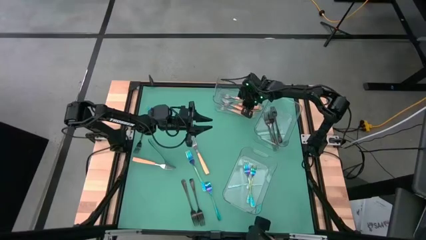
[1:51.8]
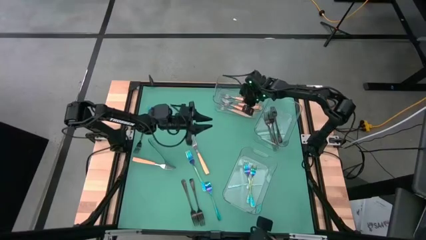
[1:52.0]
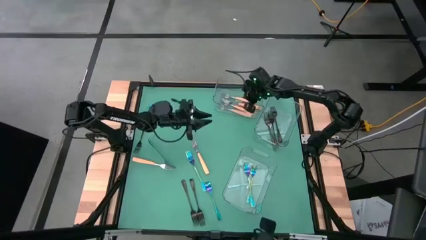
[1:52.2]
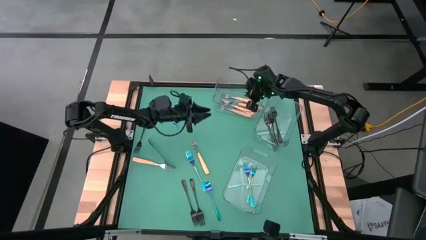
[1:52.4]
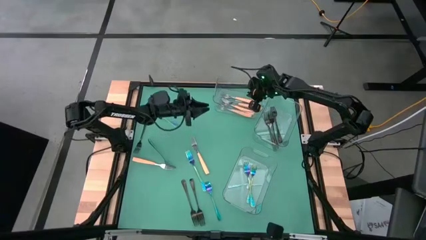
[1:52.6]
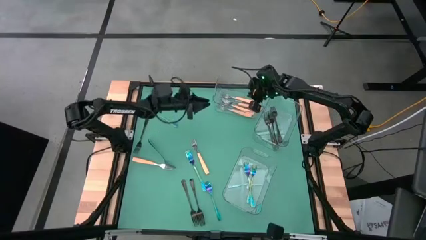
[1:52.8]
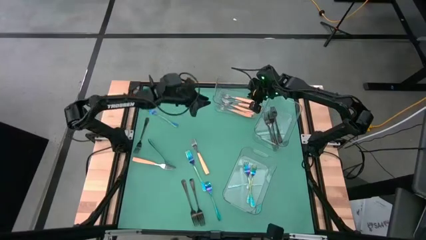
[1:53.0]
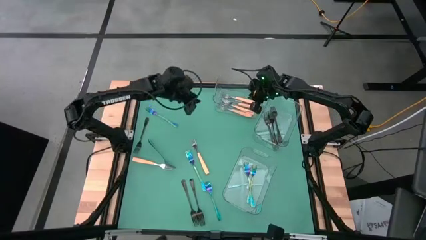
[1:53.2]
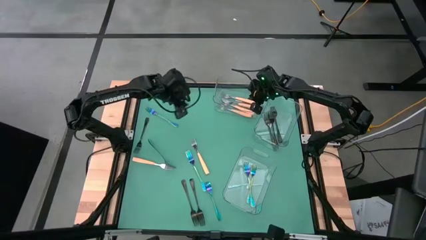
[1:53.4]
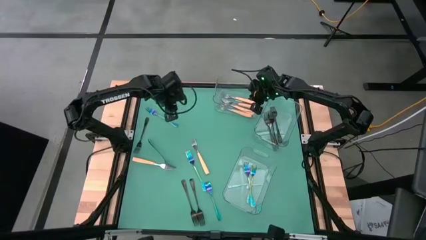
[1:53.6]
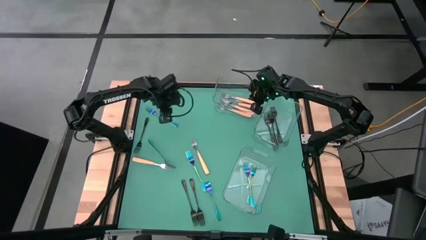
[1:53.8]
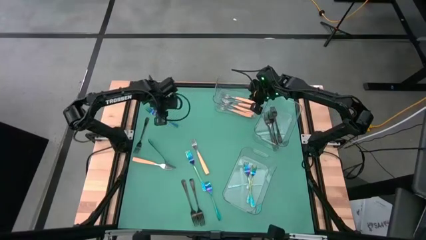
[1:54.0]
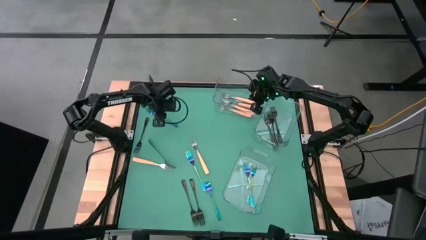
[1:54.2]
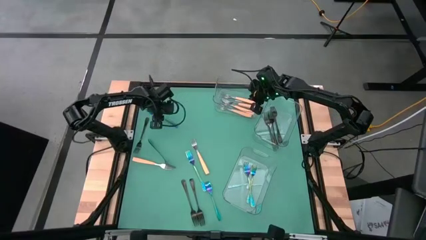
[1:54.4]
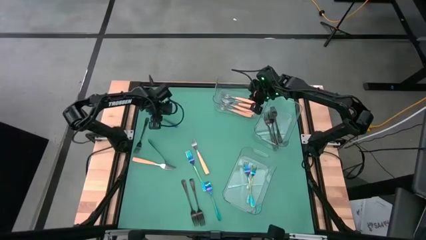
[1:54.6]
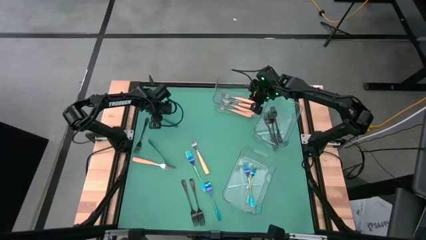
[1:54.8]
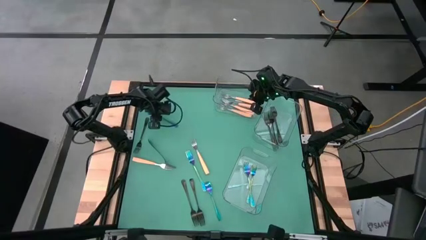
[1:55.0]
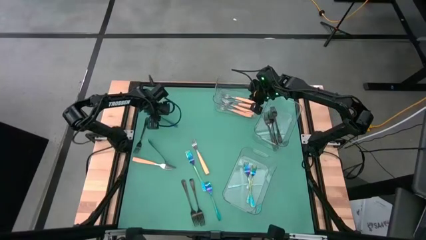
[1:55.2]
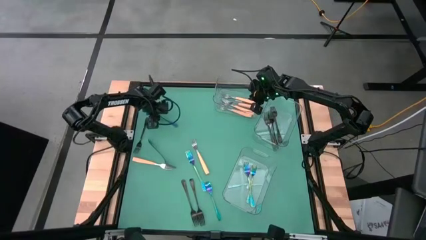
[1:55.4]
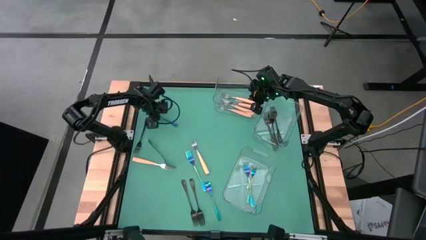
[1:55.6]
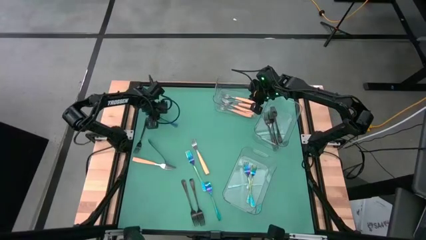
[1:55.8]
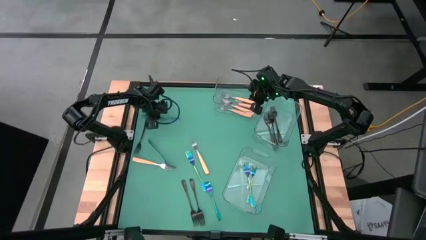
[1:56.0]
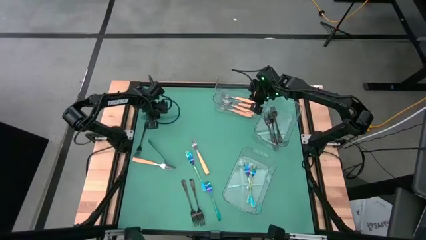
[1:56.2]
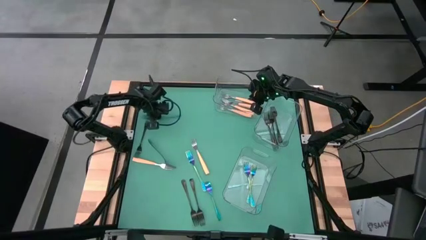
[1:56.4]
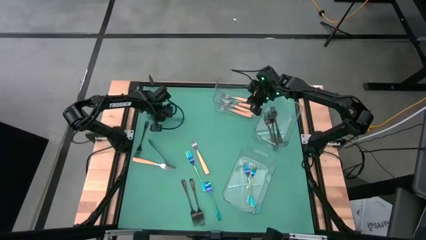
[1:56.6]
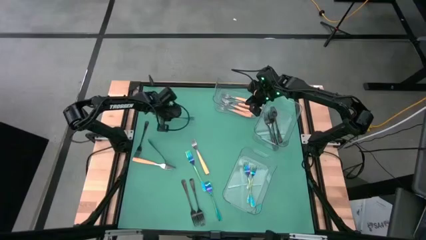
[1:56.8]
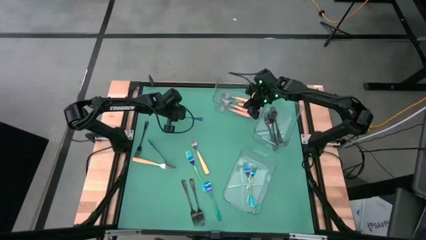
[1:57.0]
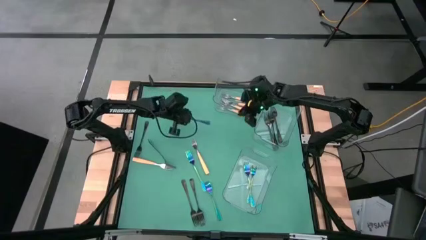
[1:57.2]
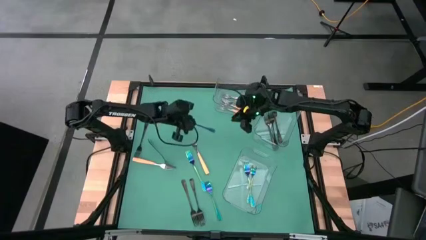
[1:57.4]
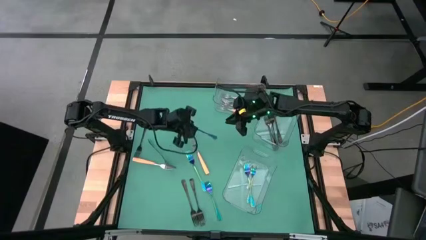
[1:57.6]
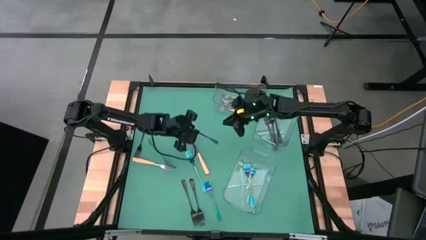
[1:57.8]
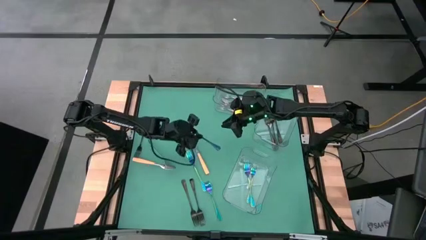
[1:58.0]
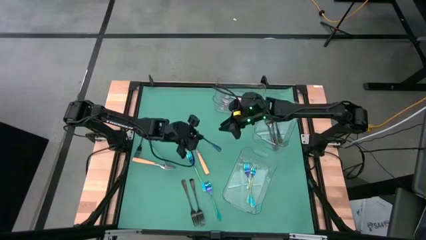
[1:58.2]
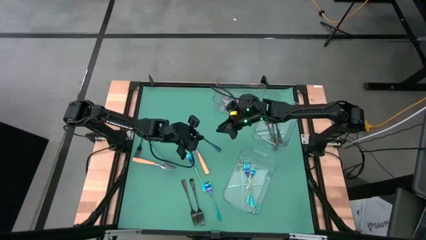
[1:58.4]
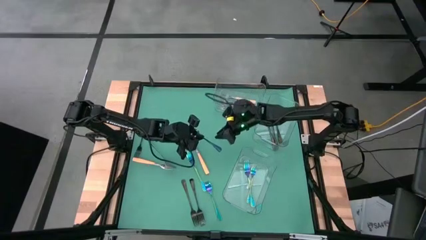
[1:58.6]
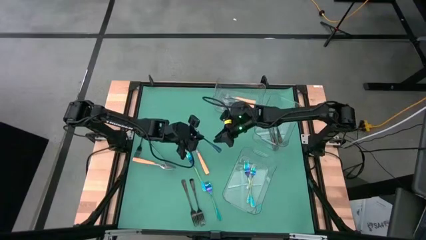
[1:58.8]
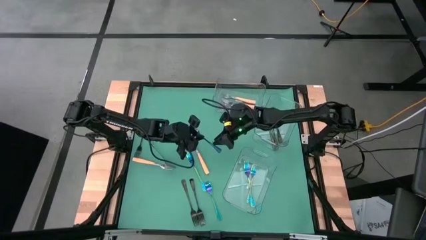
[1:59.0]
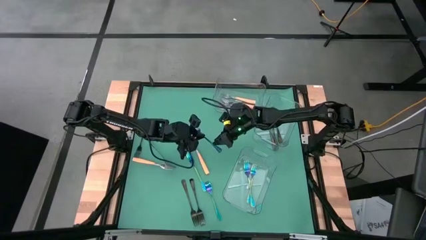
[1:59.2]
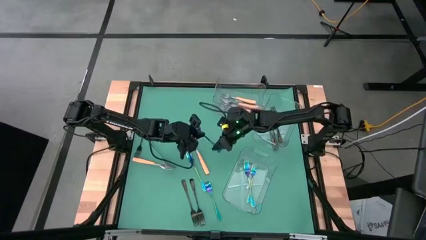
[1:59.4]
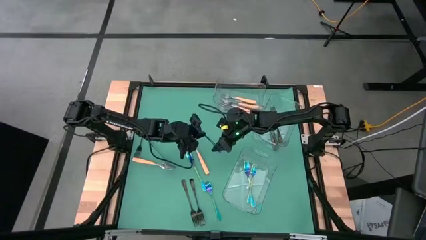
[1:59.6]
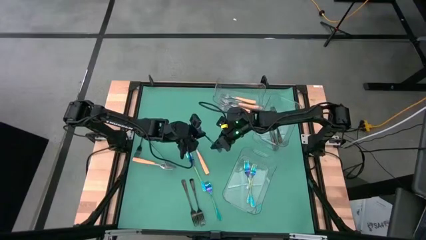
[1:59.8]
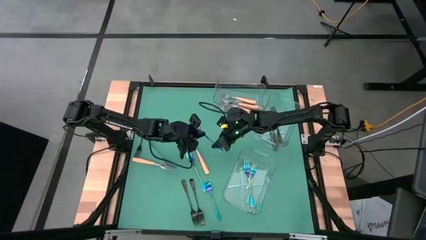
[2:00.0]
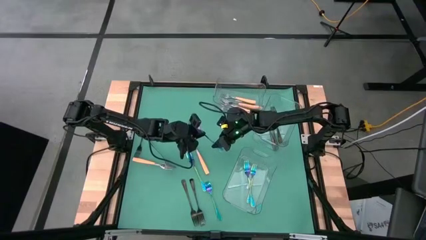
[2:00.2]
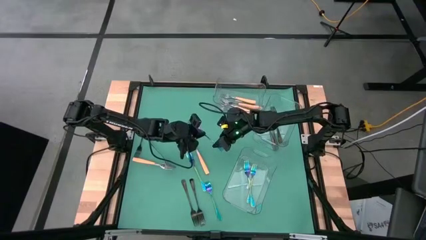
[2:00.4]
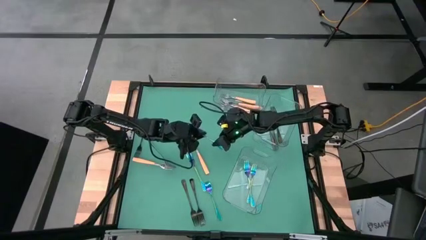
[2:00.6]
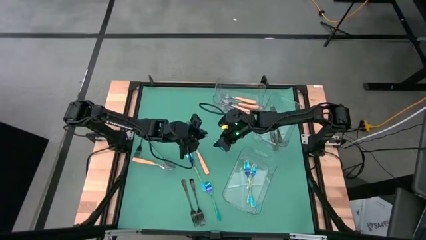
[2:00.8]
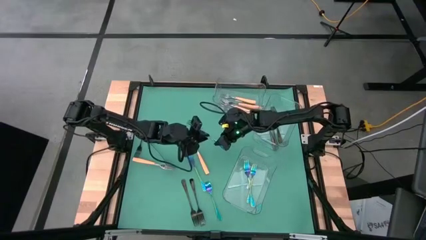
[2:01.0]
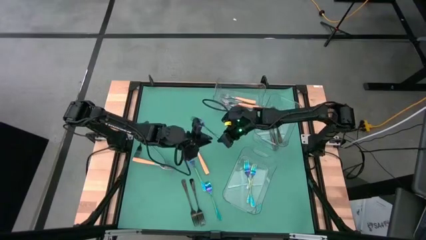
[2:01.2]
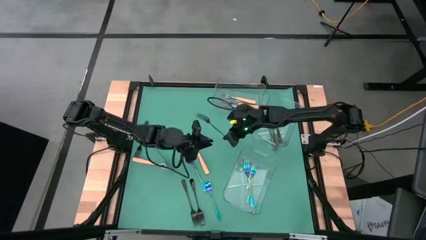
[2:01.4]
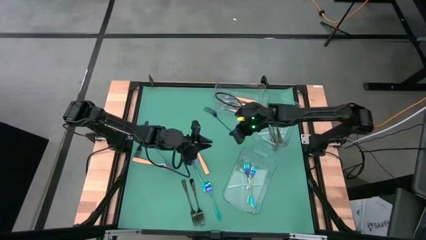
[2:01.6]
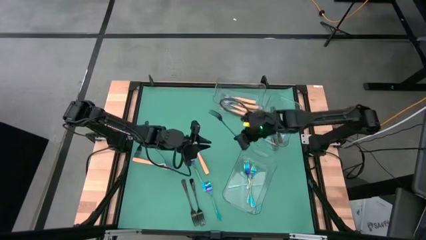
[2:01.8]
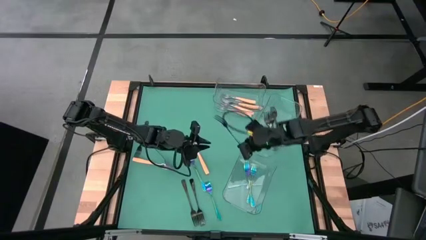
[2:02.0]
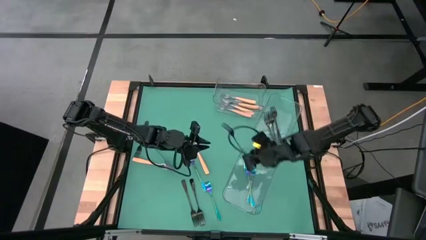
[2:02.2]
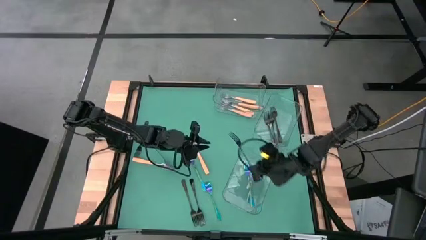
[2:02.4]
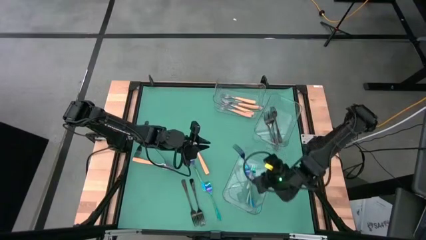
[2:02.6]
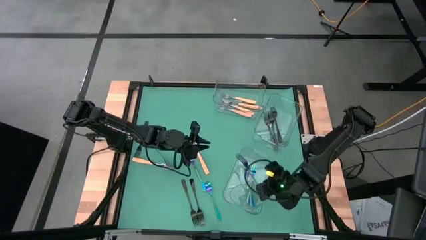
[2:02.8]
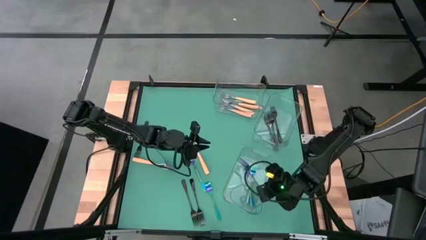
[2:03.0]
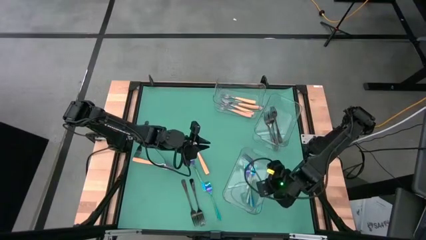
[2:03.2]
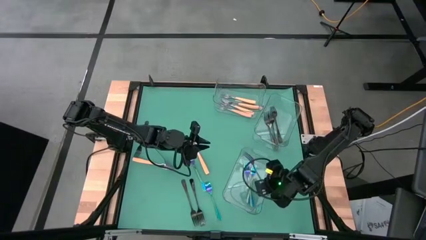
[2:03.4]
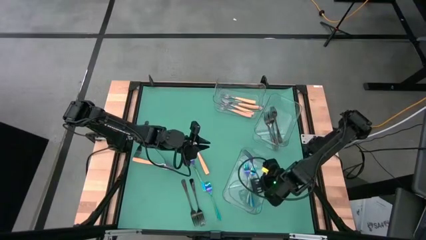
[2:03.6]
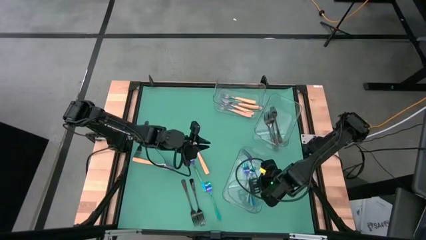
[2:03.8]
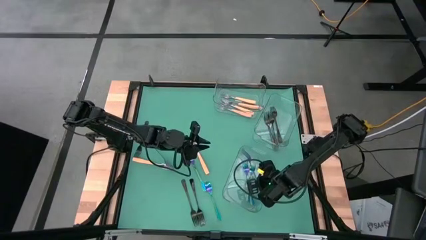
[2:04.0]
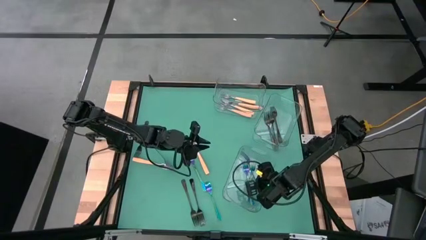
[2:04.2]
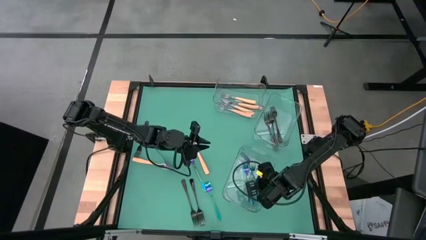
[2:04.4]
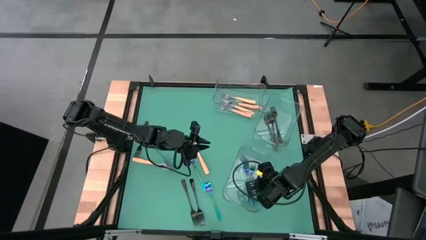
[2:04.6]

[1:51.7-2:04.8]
Task: Sort silverware by color (type)
Put the blue fork into the bottom transparent bin

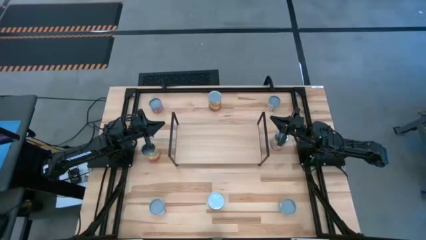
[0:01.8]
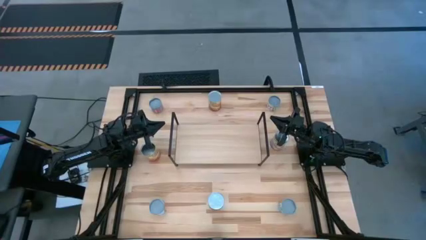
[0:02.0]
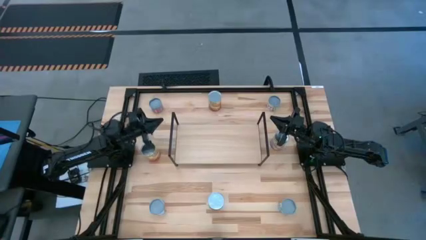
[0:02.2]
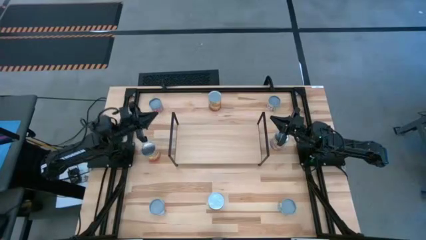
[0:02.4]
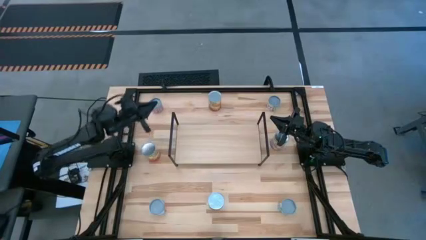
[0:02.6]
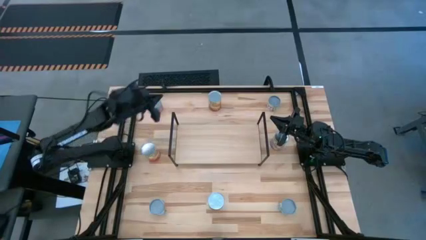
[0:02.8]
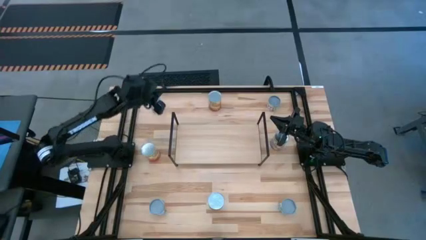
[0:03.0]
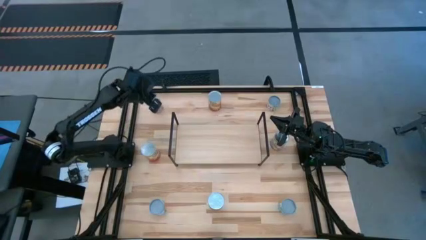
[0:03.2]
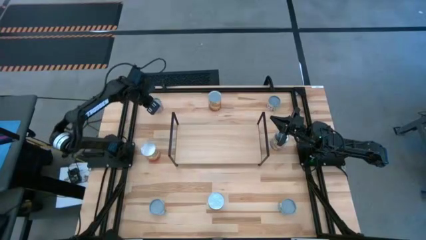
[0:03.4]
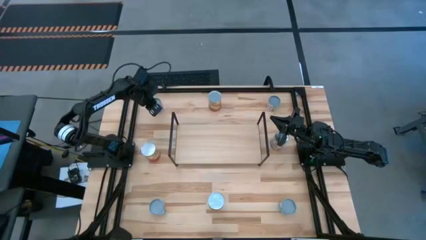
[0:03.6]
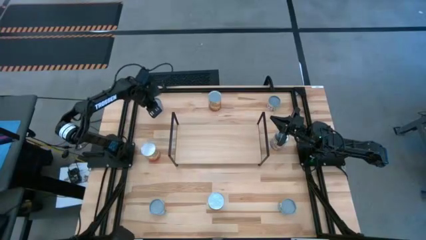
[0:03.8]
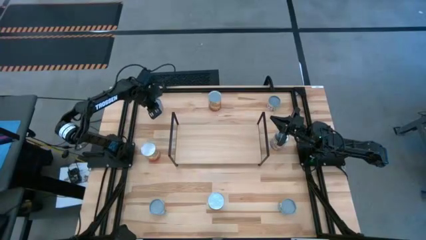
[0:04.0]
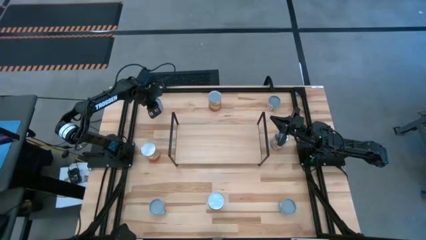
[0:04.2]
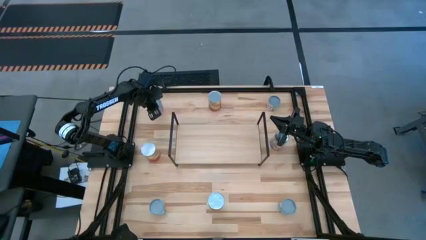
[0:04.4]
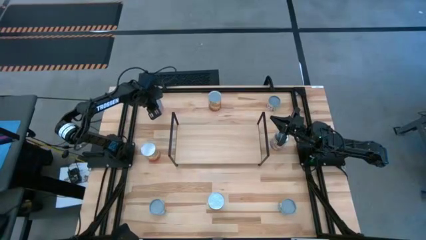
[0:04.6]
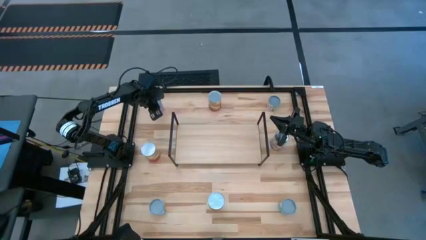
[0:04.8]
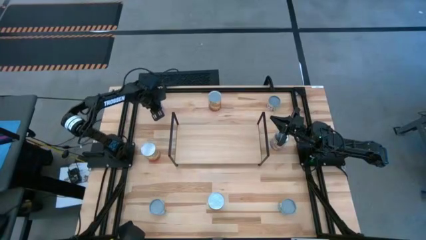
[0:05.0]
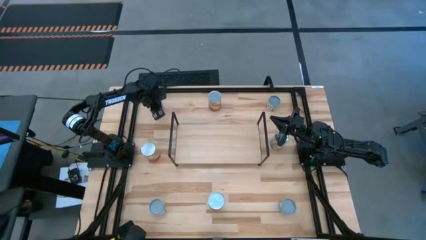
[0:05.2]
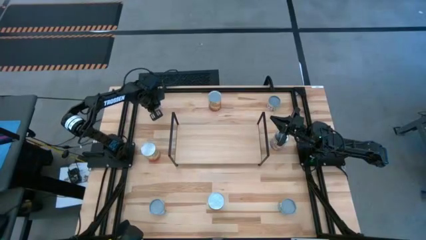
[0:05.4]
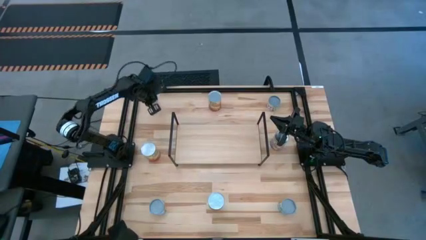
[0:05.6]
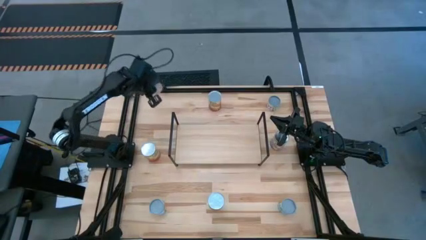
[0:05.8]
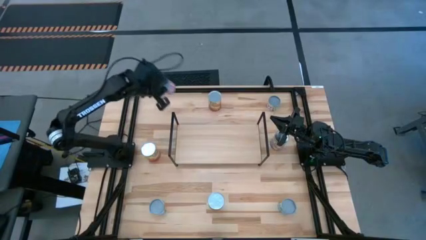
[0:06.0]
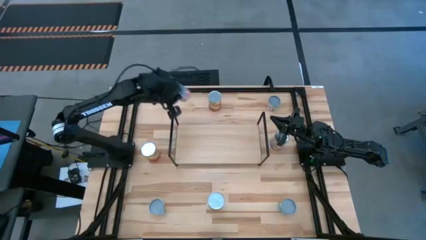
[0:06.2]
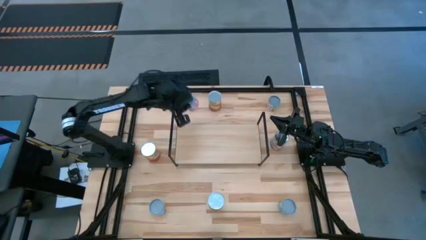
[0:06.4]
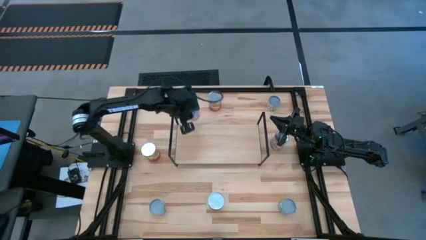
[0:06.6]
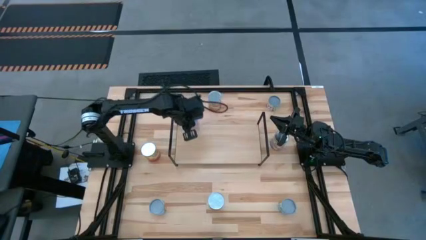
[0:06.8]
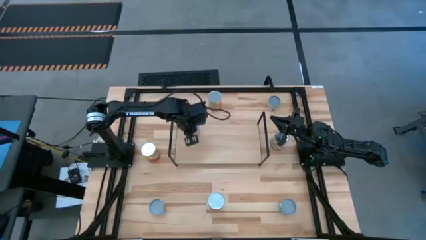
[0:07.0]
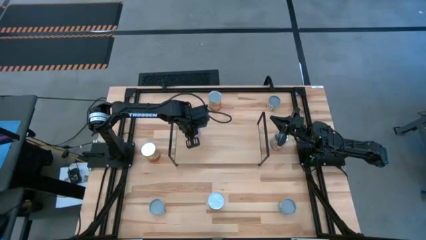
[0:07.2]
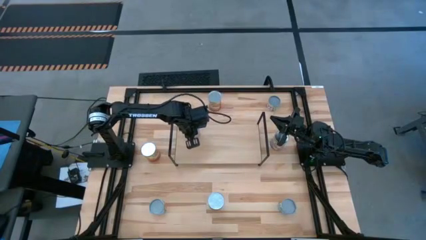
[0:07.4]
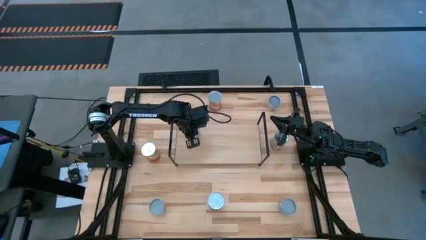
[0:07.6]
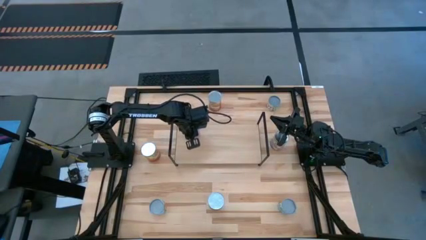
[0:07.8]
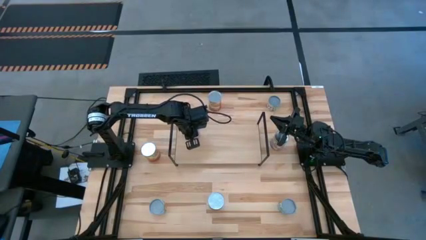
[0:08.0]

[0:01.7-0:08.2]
Task: Pick and place cans onto a shelf
Put the canned mixed vegetables on the shelf
